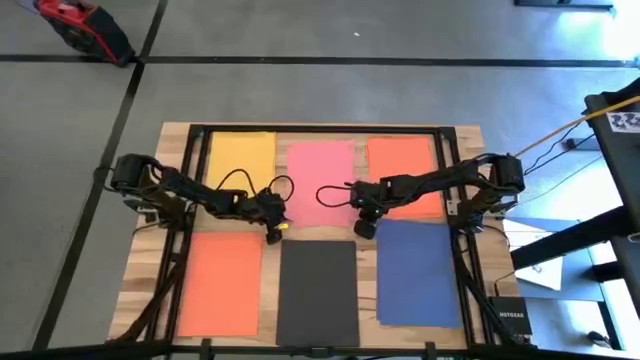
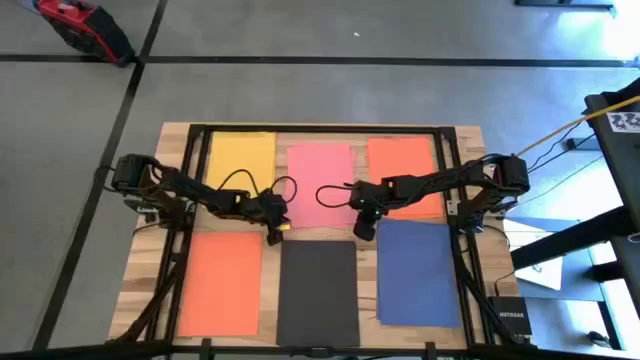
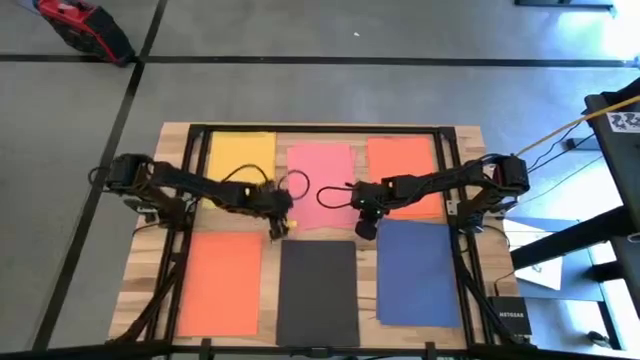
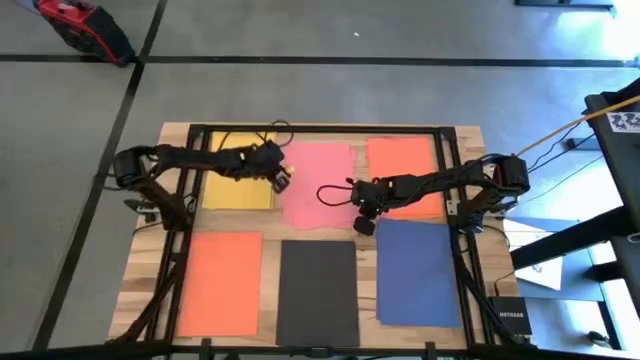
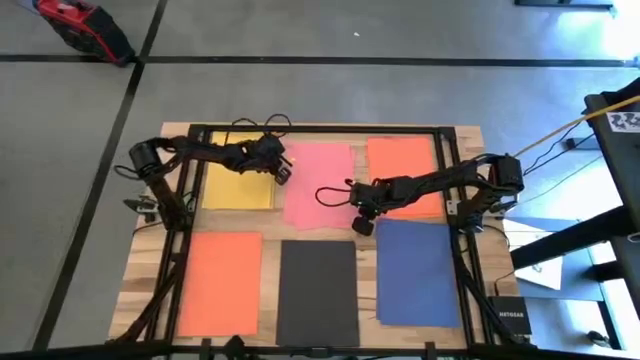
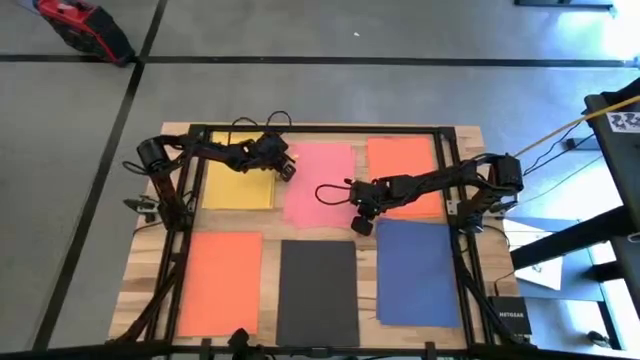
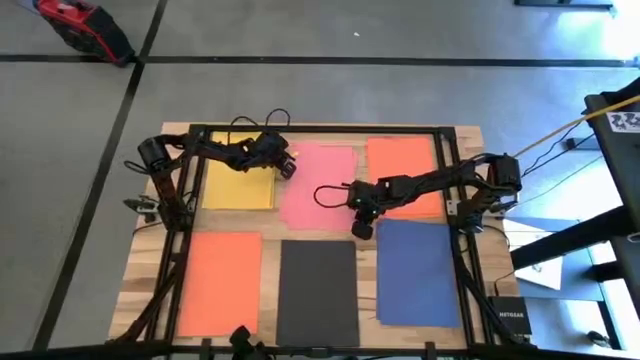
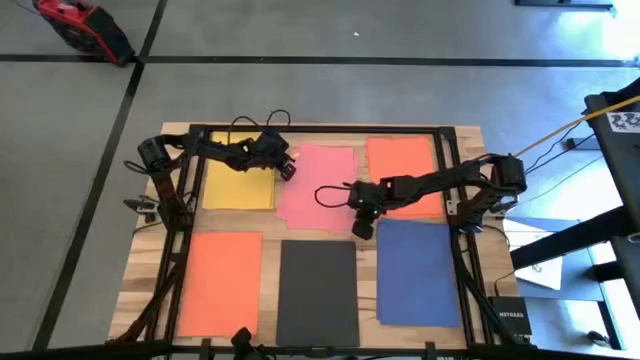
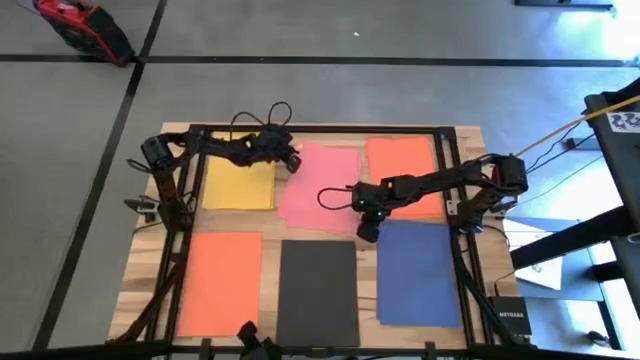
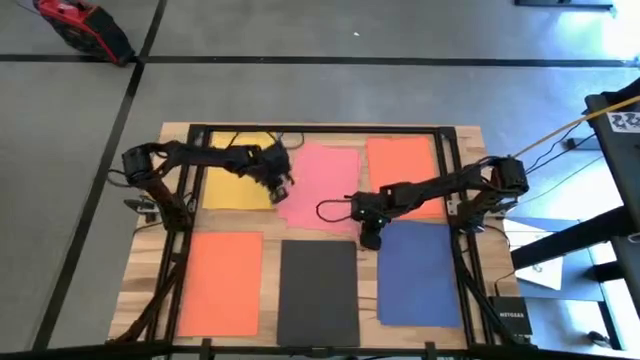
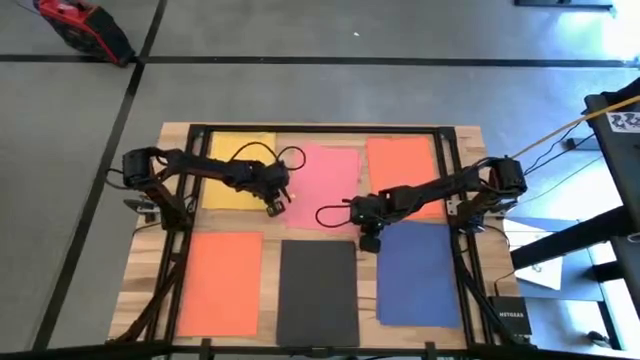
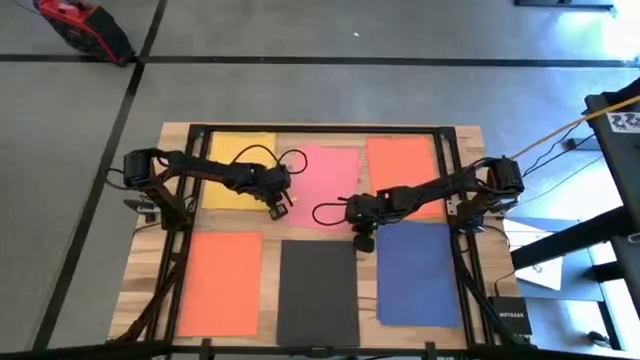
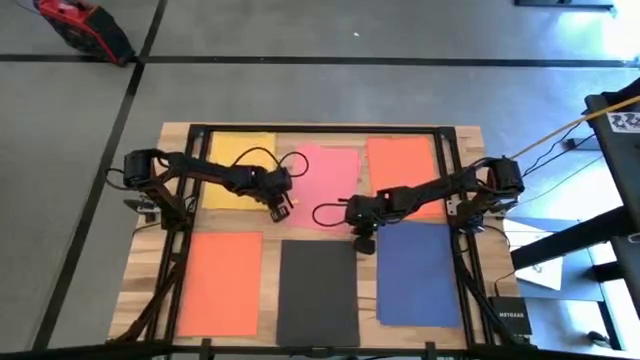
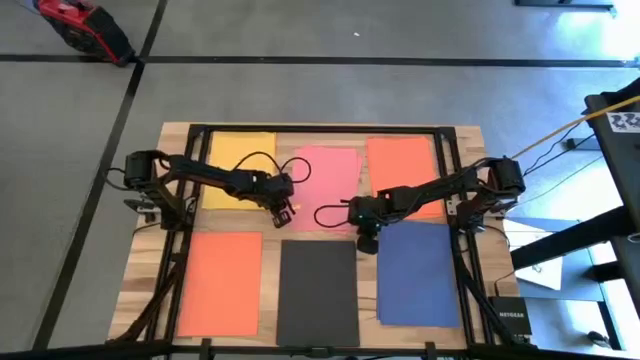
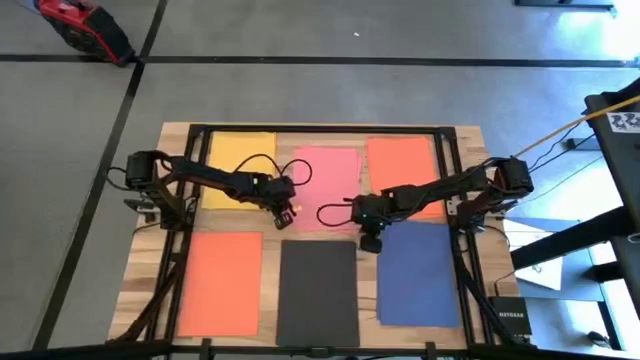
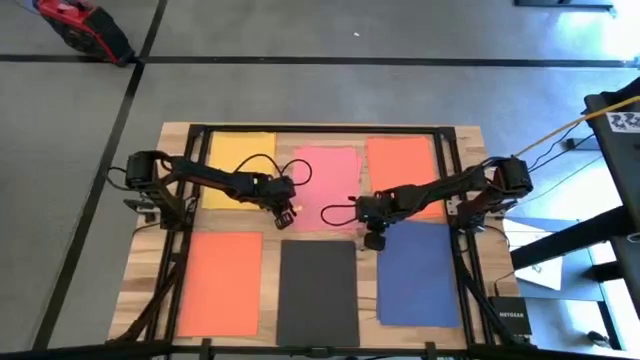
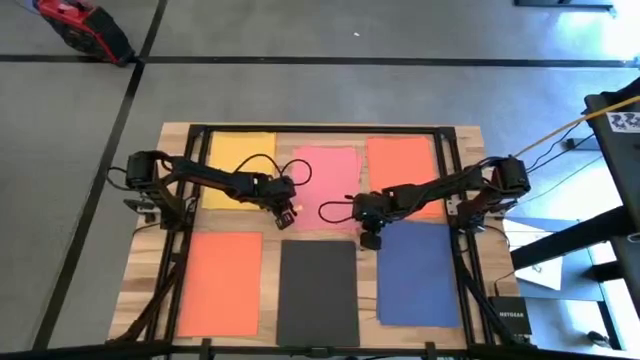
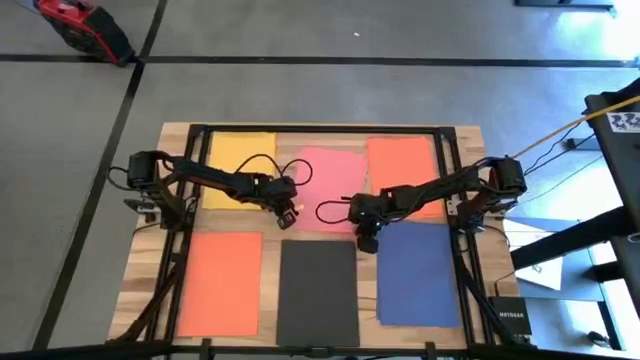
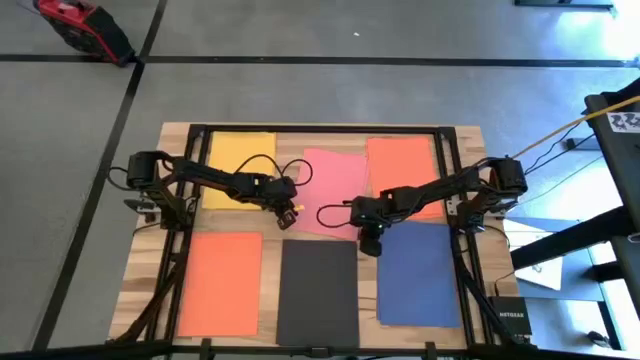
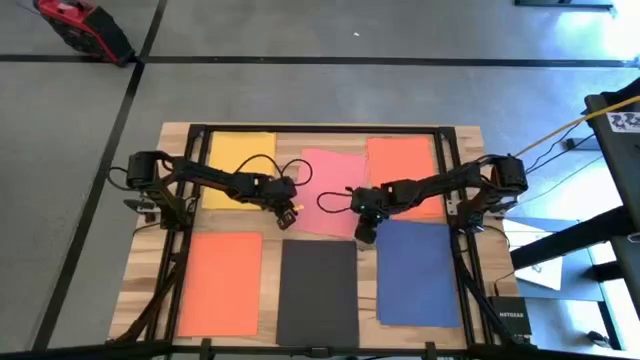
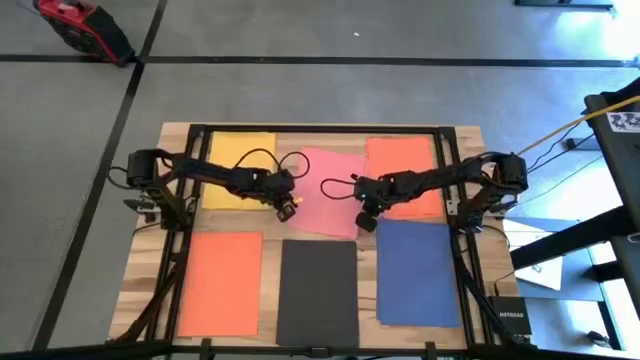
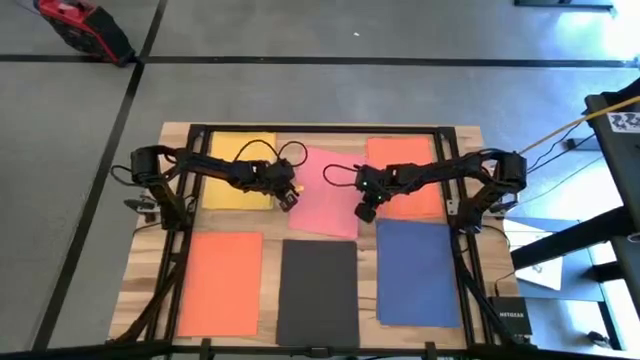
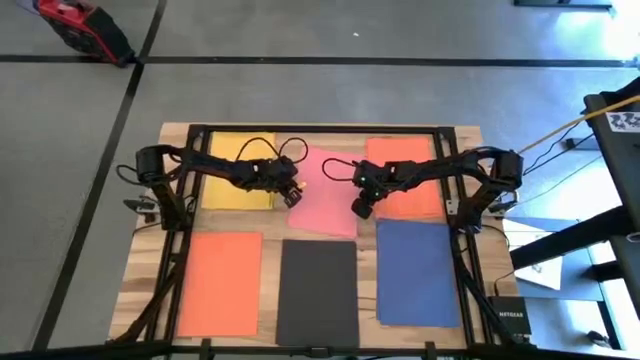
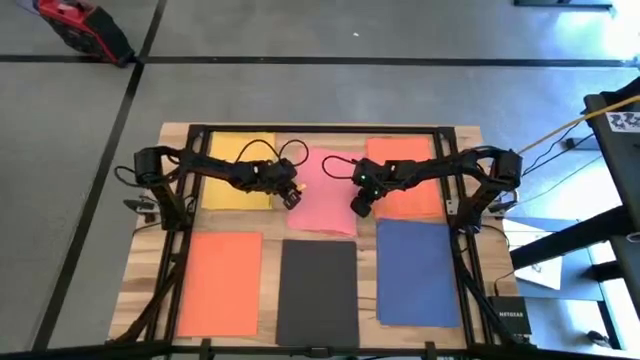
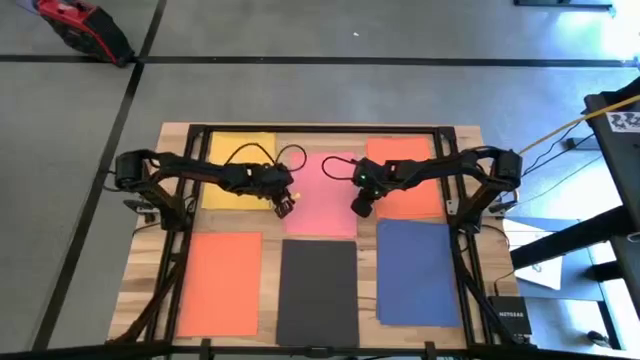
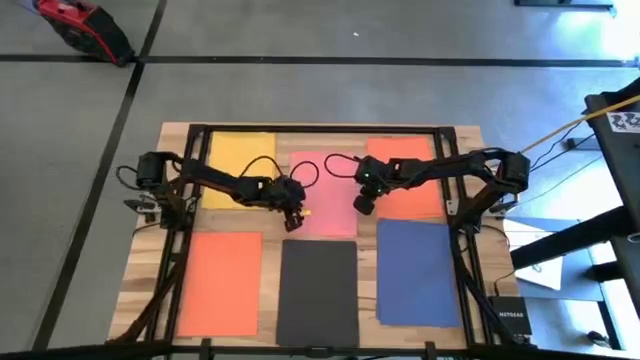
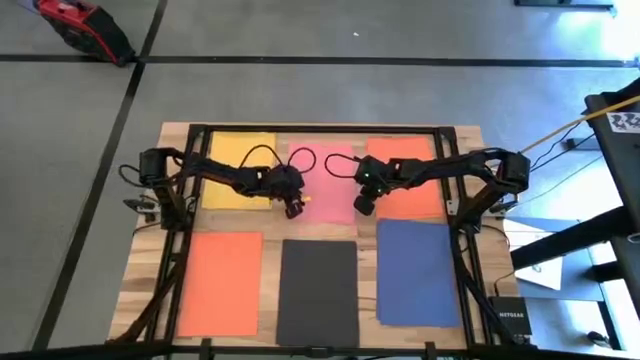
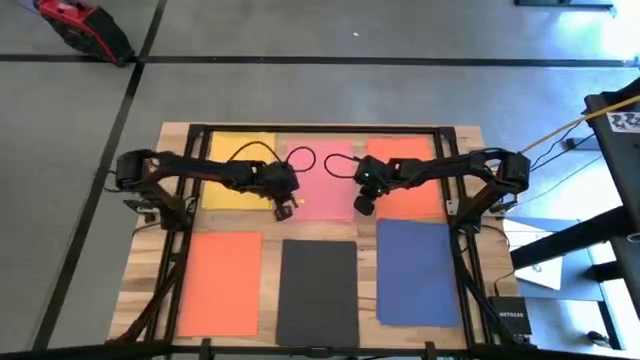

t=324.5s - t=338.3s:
Task: Organize paper
Stack the pink paper on top of the pink paper

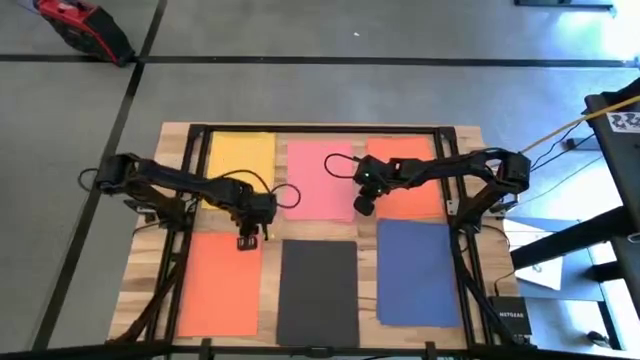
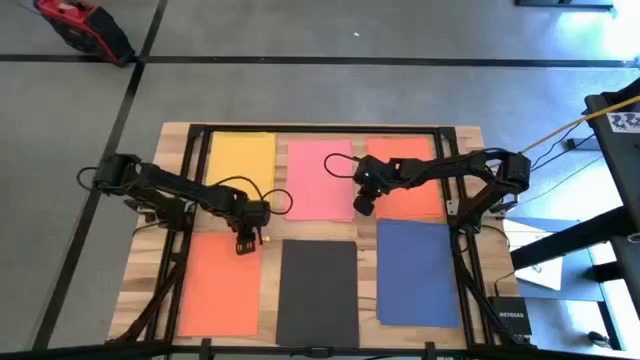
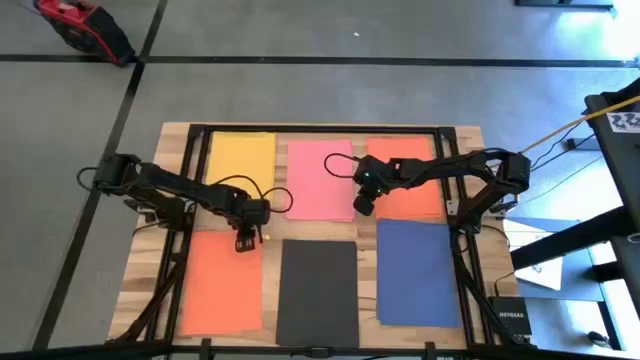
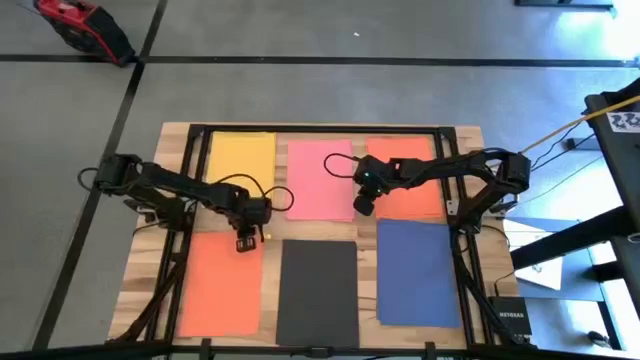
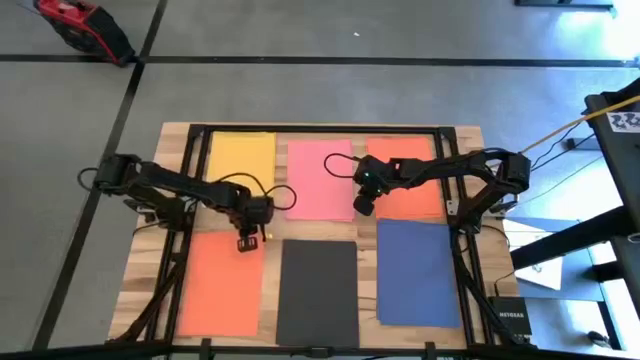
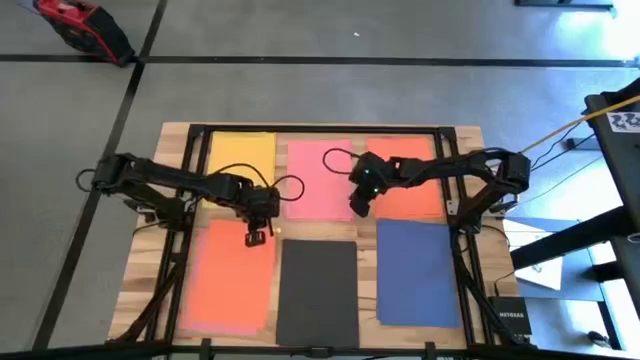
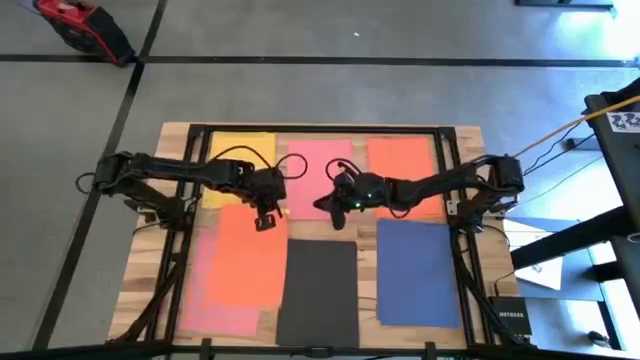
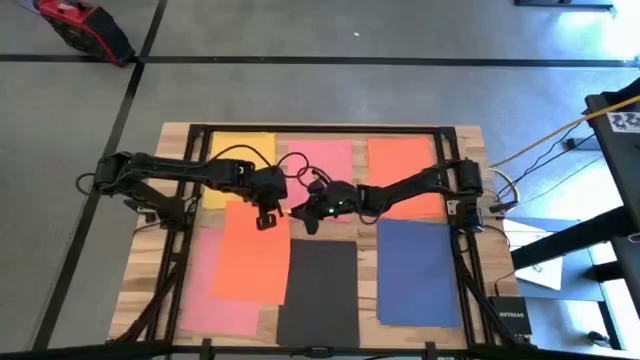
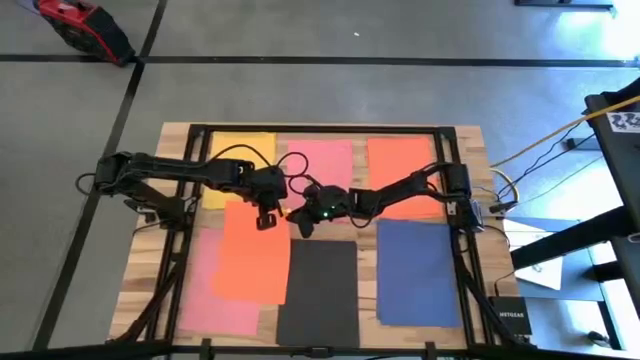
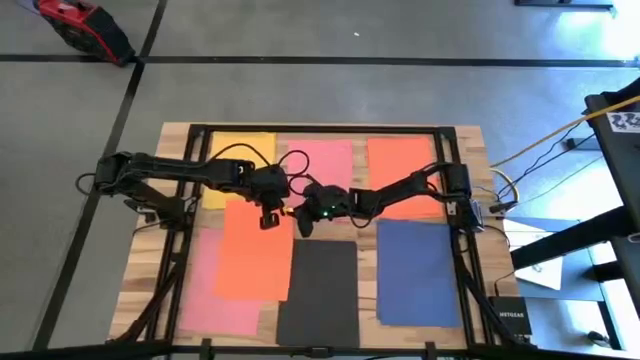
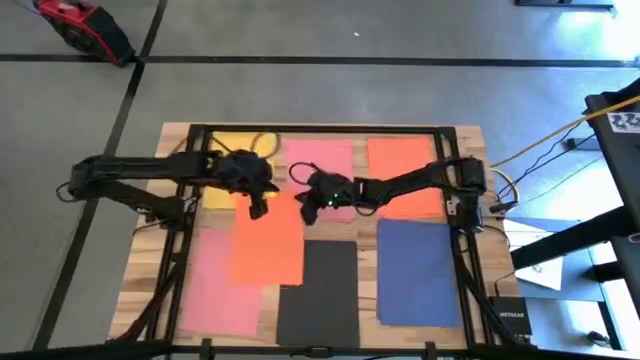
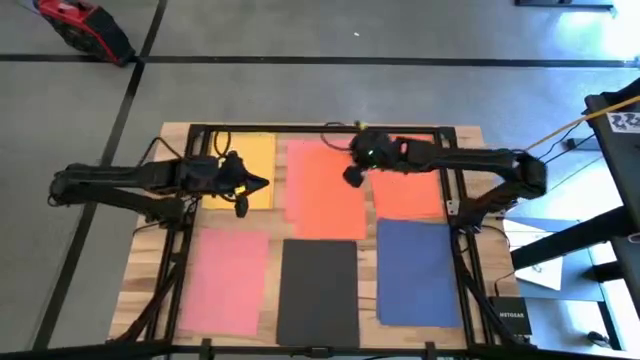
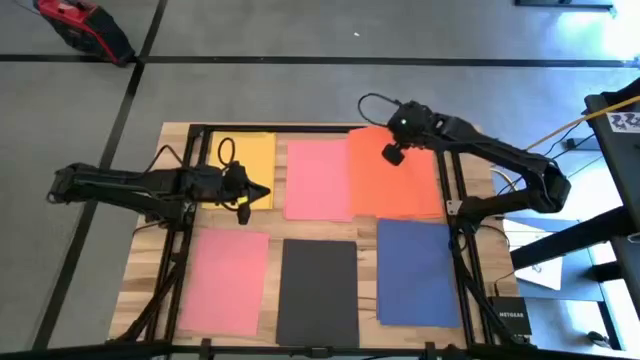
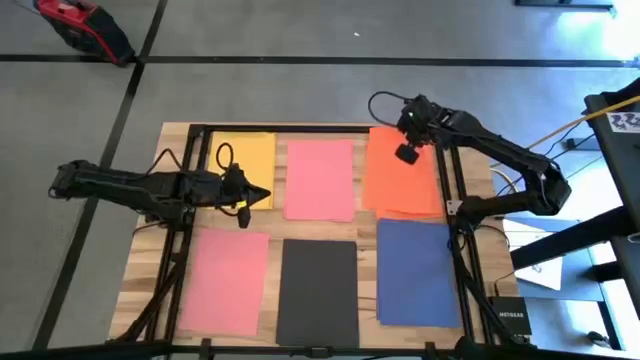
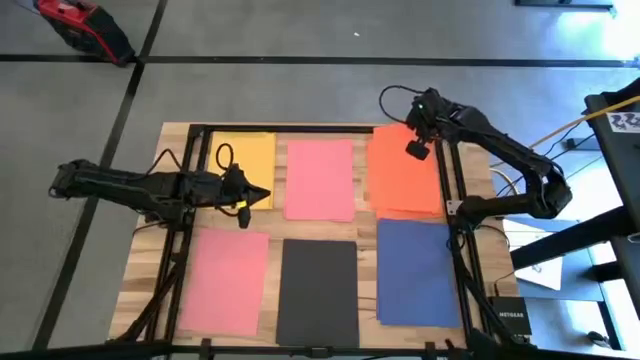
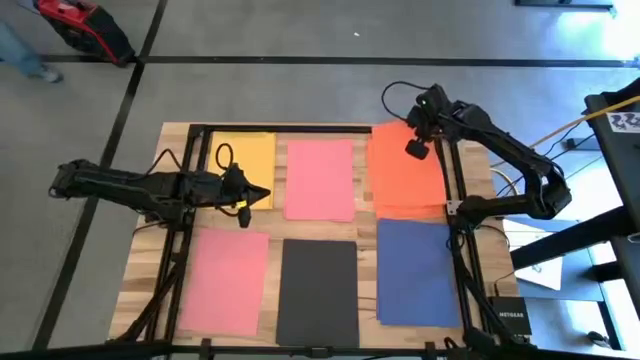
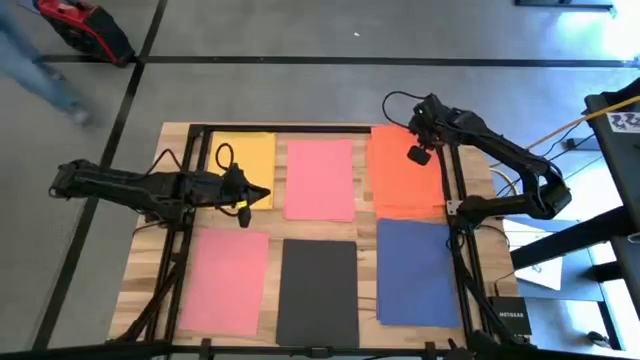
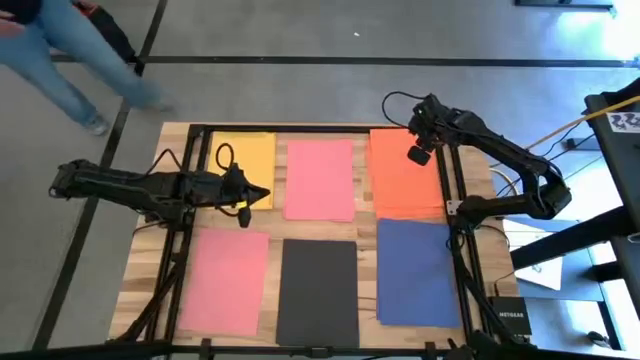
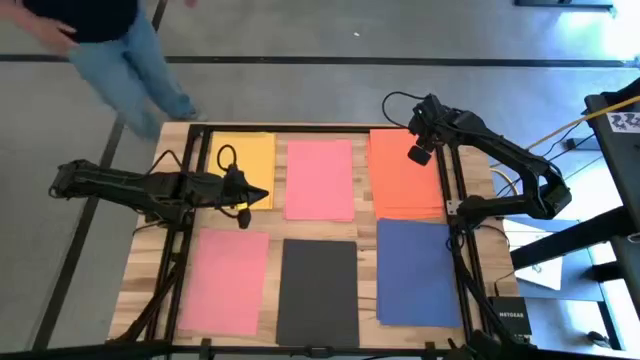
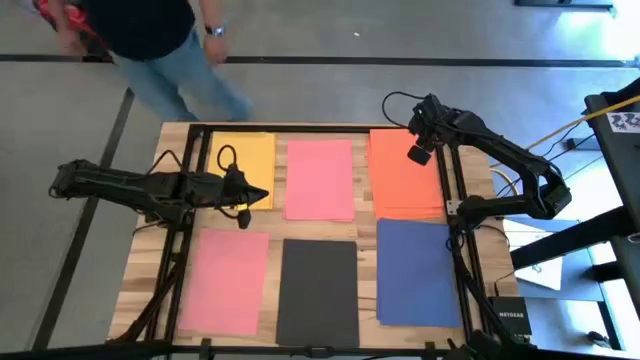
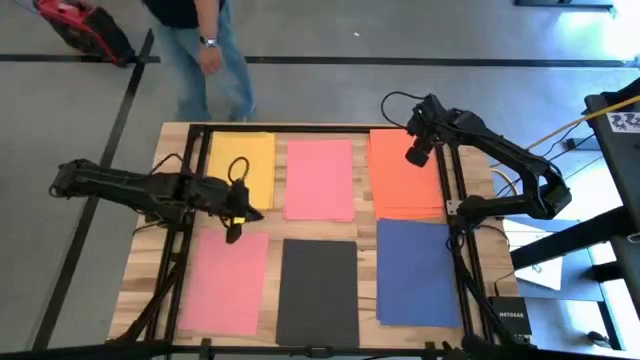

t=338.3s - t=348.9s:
Stack the orange paper on the top of the orange paper
